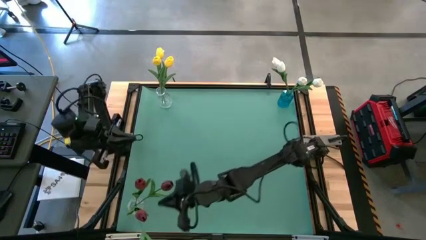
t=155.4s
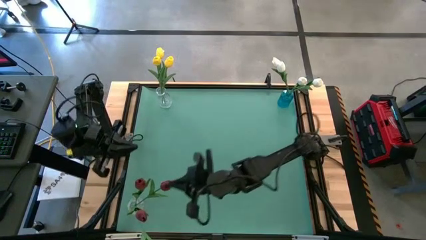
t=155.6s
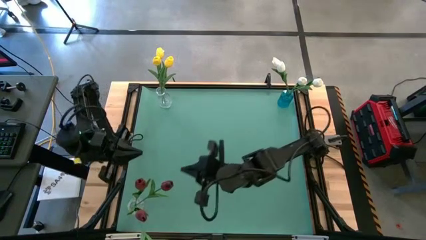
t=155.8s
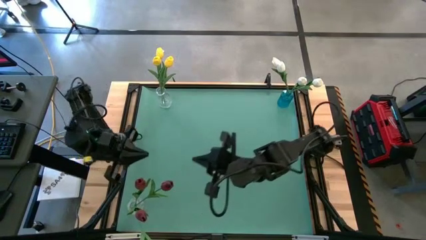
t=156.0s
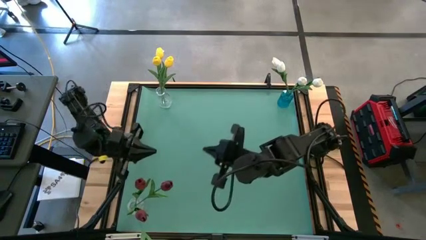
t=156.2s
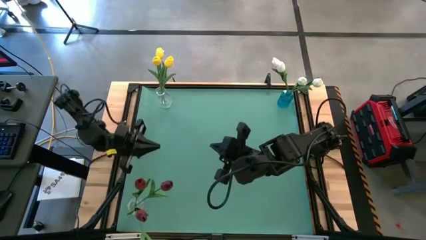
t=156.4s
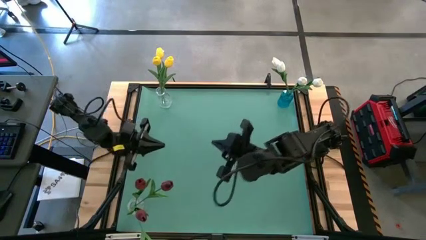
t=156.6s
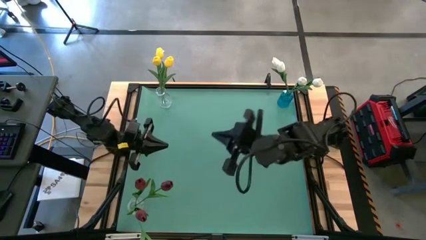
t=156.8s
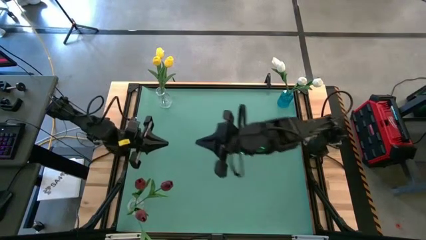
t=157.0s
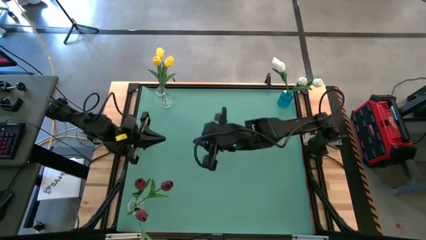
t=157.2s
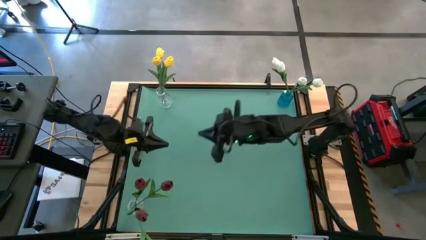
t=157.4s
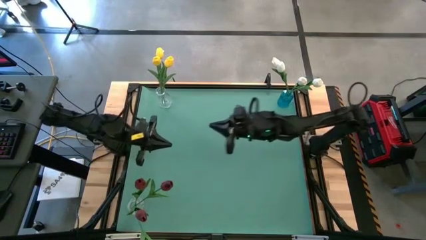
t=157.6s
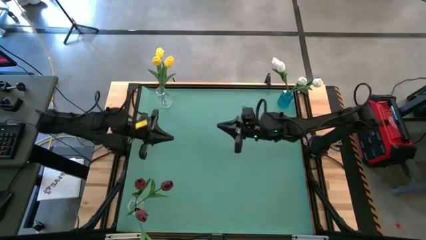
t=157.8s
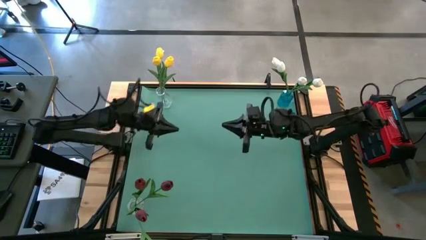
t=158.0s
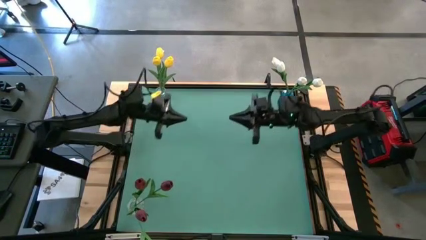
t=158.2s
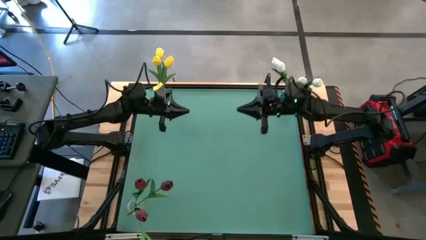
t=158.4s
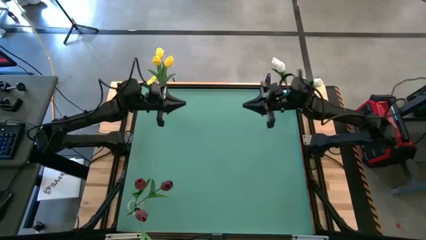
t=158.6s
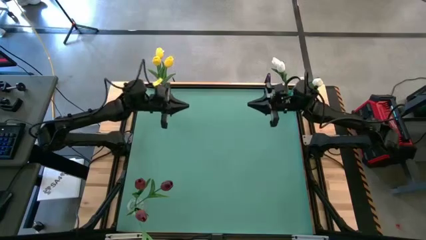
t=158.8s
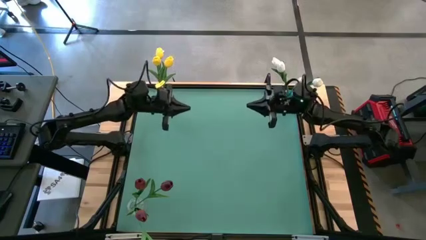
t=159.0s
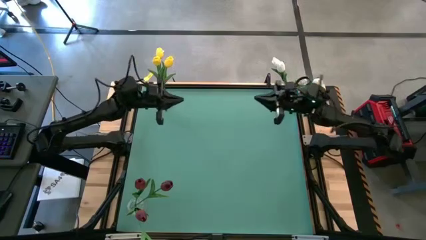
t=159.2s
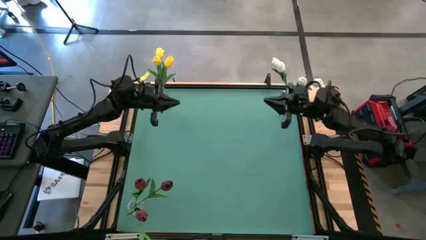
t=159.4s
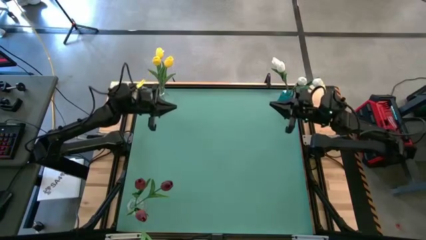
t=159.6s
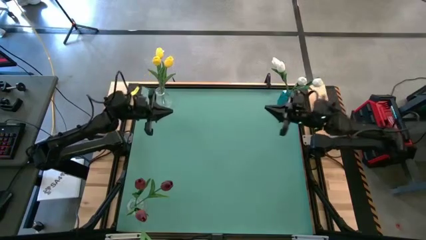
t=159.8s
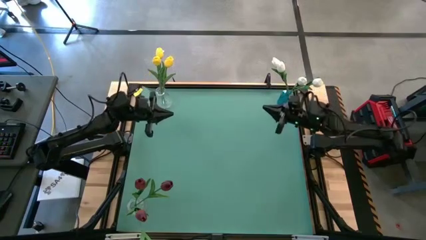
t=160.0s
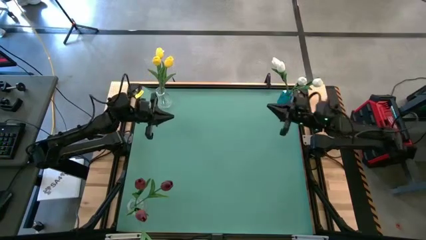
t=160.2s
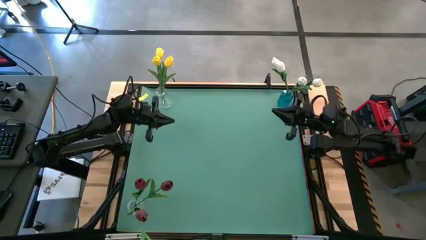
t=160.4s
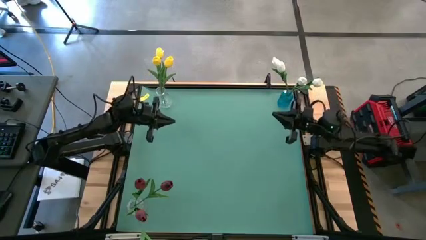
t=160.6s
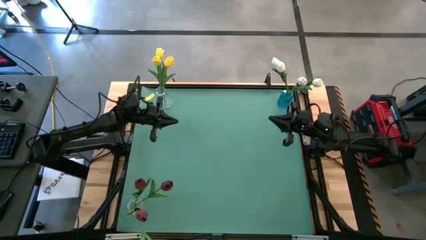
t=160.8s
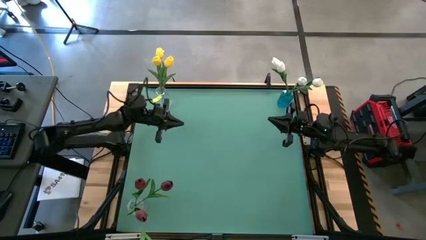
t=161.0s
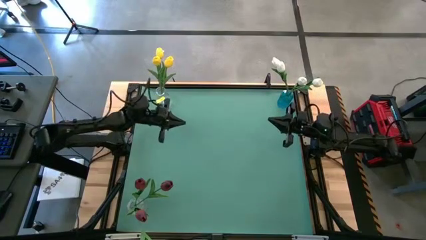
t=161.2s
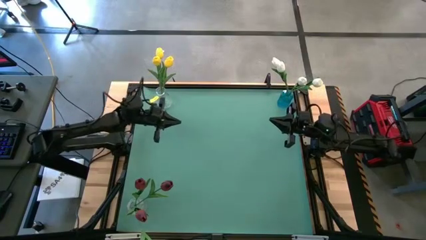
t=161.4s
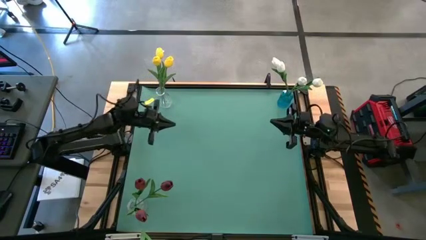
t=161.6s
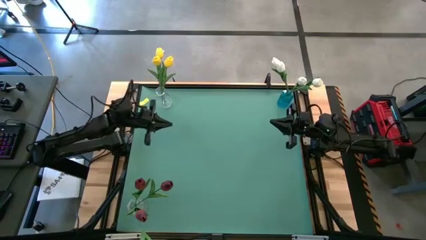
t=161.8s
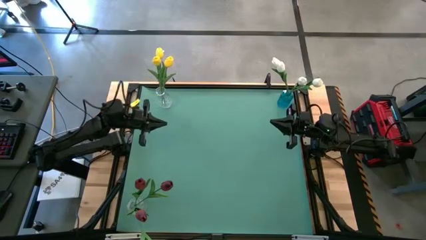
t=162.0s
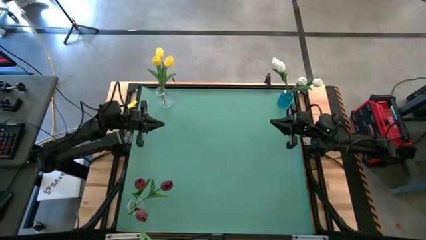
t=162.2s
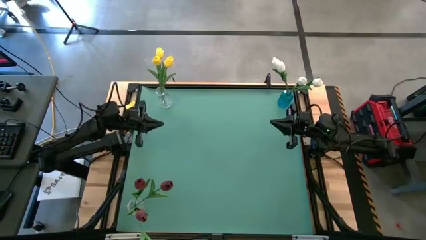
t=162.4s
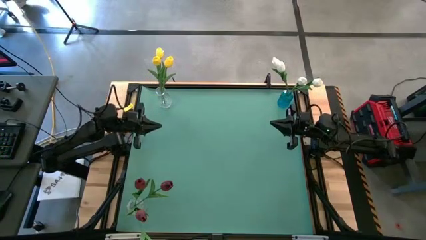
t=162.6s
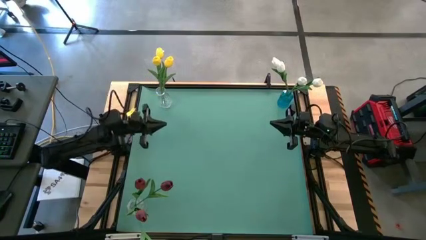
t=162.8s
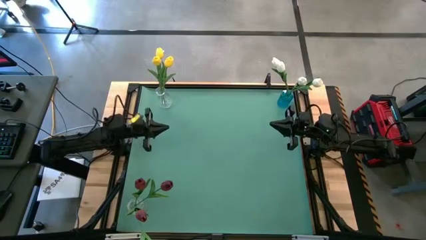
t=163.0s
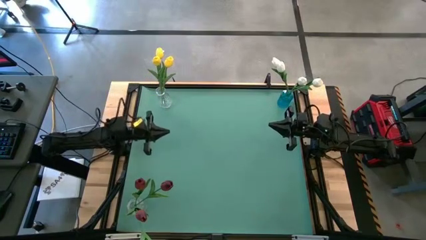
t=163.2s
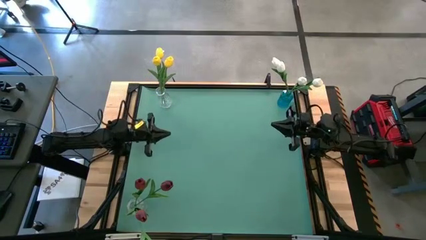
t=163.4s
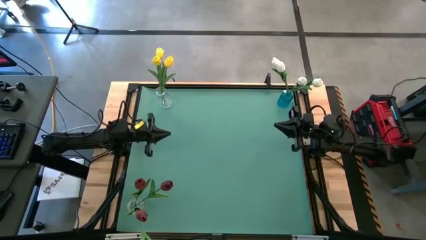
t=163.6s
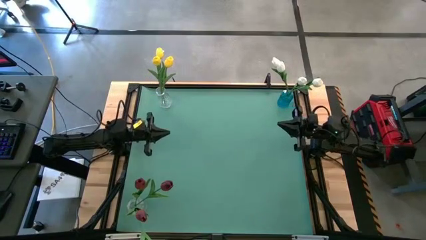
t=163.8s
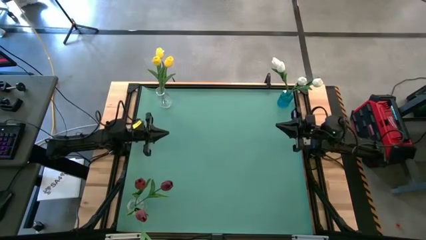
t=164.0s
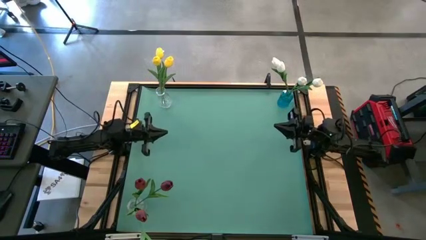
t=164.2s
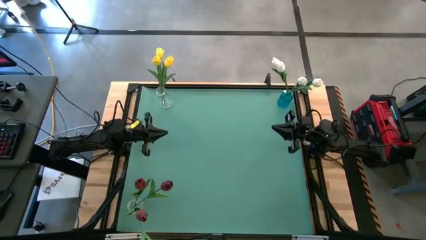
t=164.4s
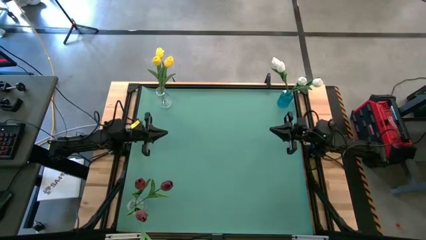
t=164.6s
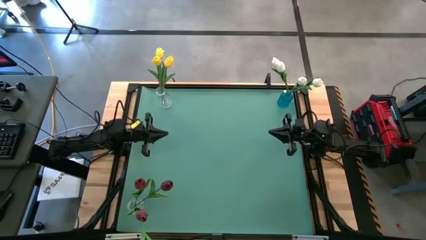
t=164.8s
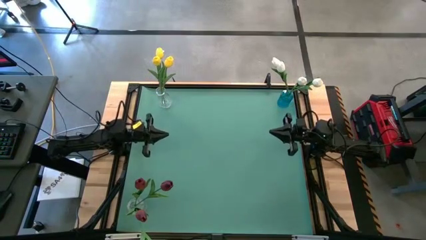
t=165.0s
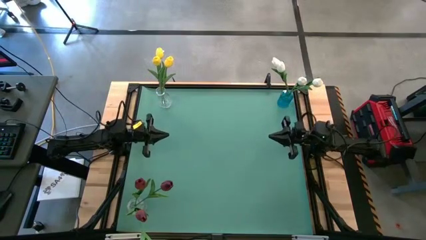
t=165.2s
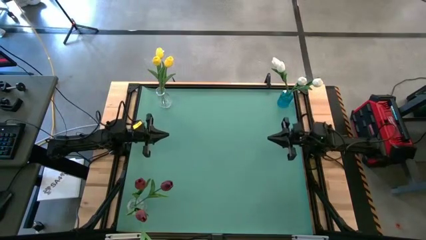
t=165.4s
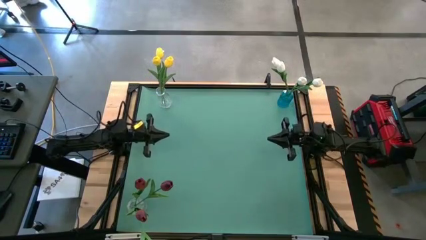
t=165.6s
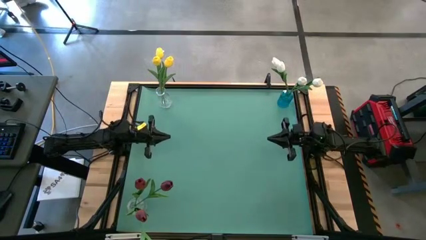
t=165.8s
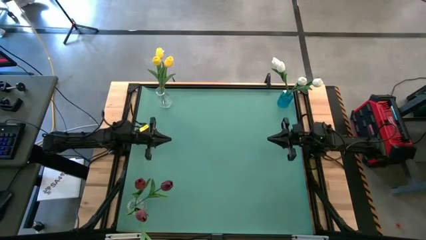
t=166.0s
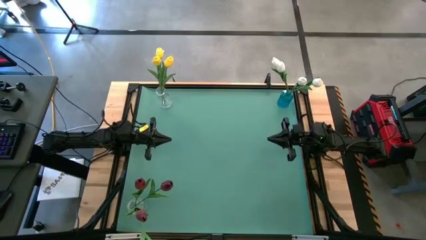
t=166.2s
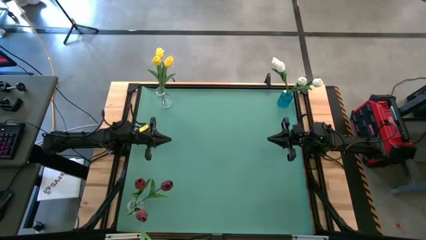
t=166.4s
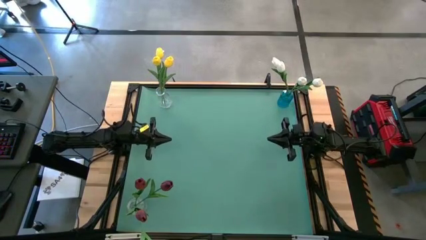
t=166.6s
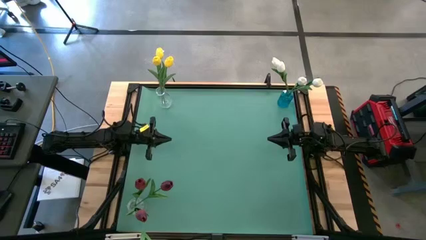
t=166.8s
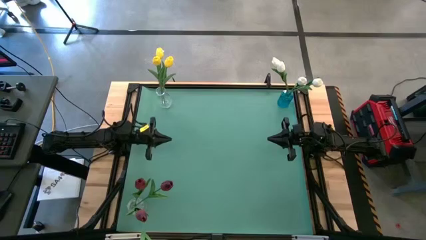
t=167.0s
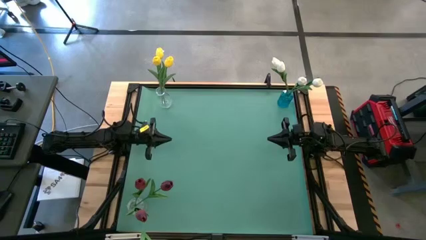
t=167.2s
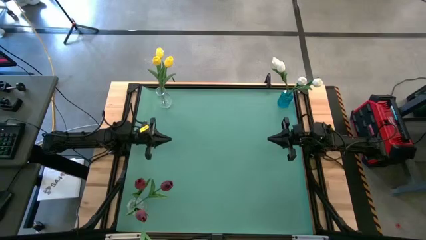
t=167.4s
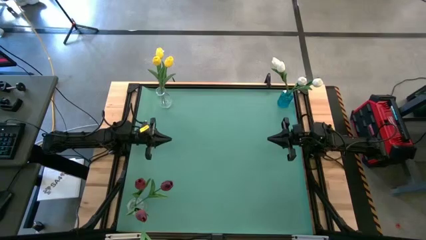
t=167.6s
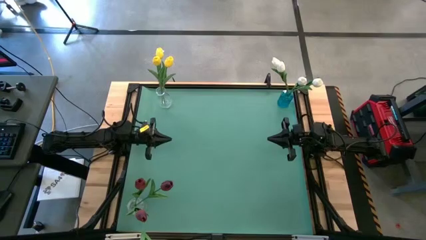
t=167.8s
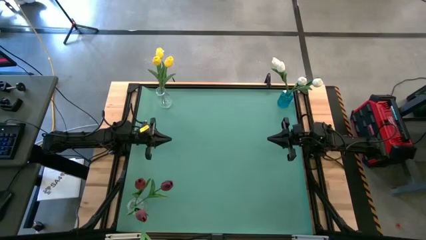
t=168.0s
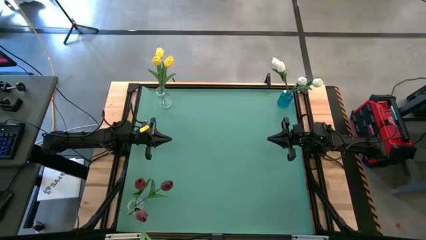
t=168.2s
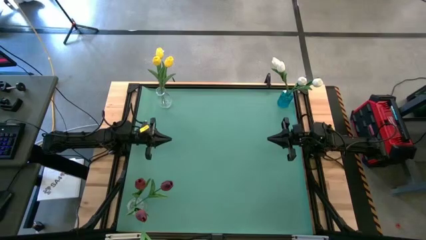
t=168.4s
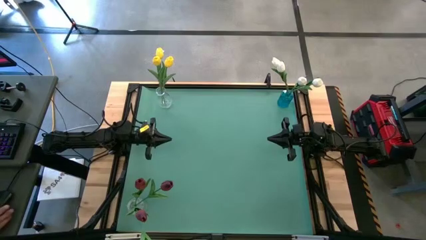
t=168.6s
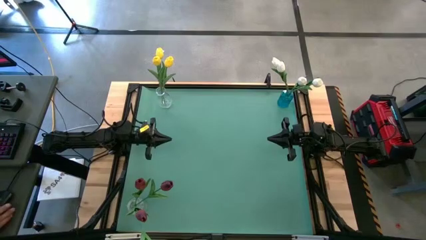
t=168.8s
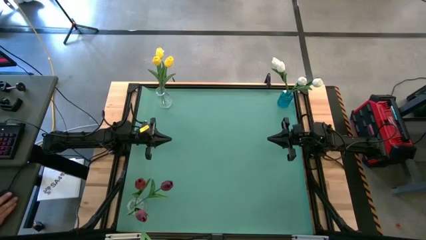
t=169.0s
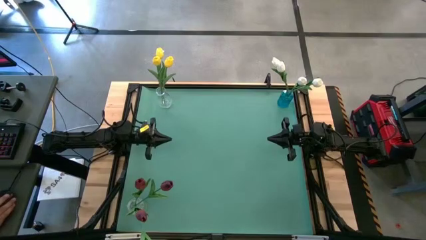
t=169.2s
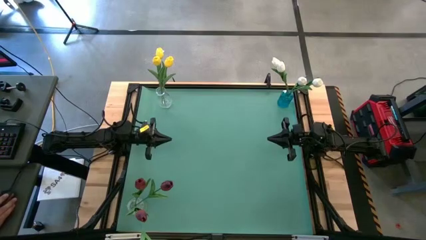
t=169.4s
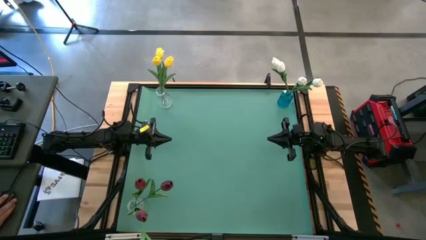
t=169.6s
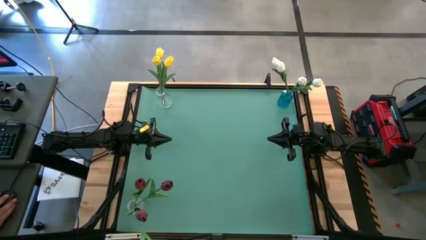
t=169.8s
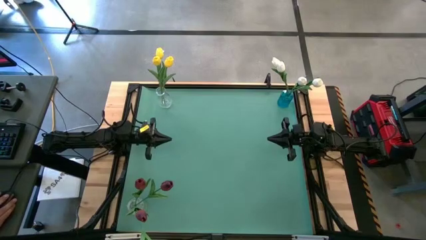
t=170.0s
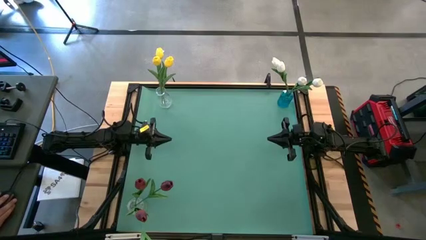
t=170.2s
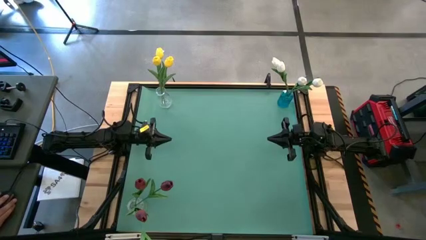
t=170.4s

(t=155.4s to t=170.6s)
Task: Sort flowers into vase by color
Return to Home Position

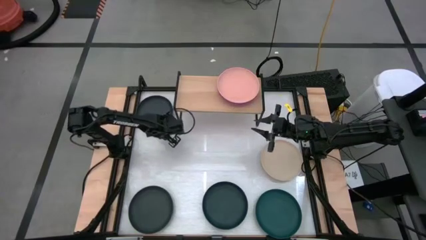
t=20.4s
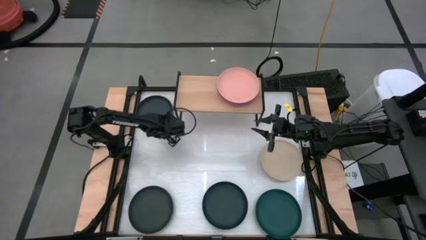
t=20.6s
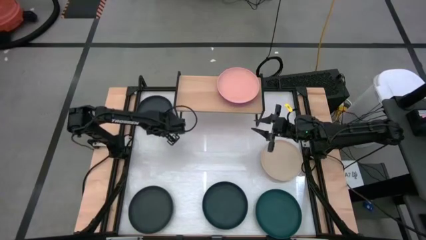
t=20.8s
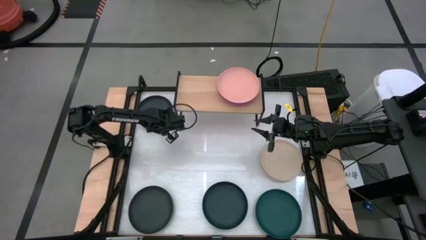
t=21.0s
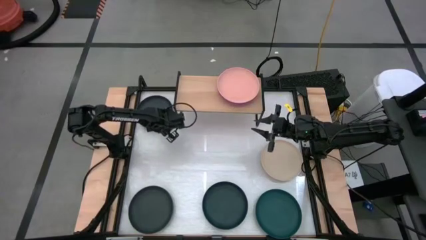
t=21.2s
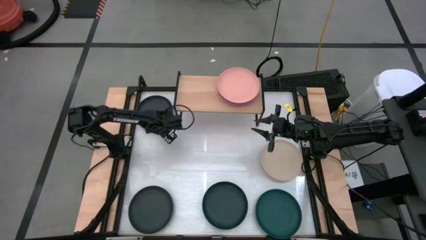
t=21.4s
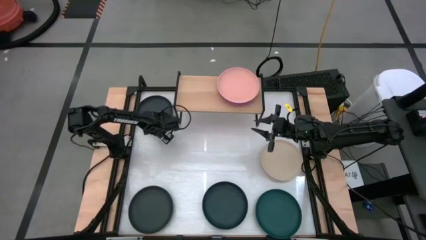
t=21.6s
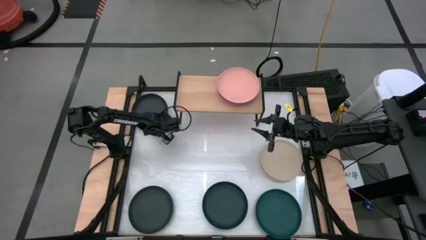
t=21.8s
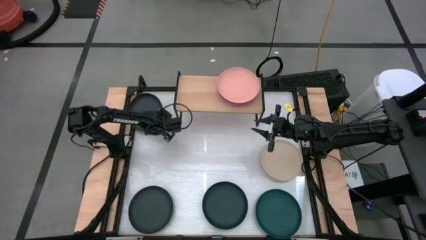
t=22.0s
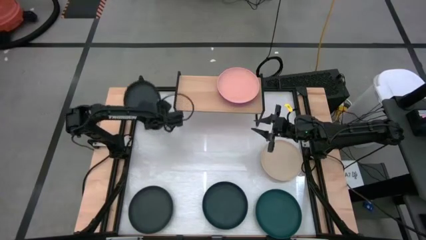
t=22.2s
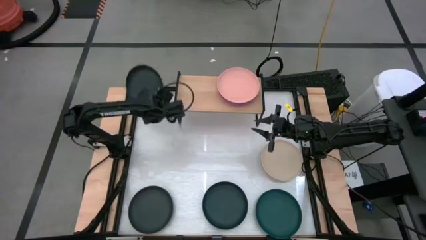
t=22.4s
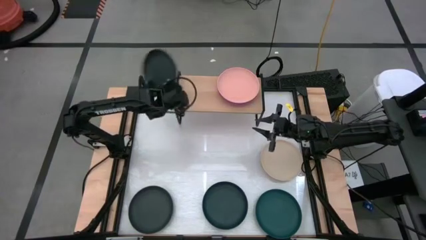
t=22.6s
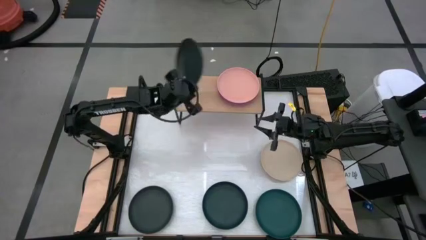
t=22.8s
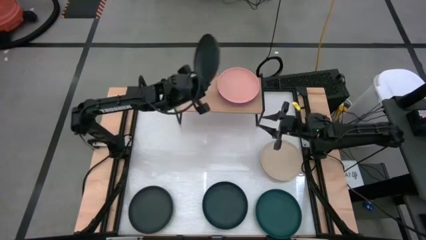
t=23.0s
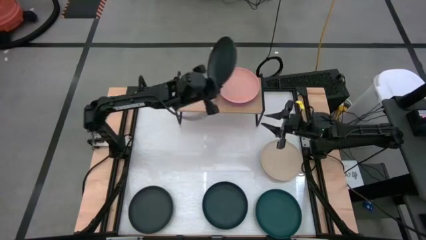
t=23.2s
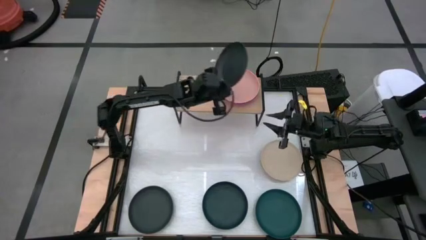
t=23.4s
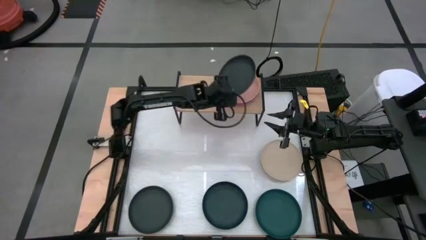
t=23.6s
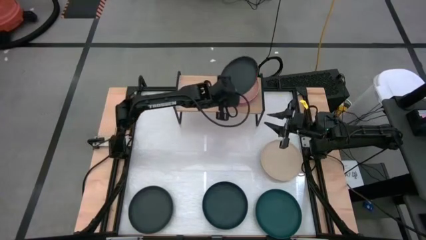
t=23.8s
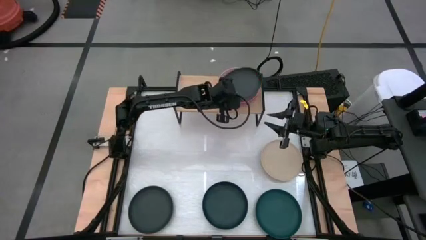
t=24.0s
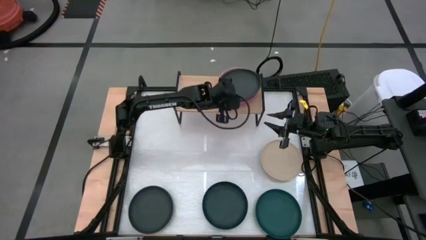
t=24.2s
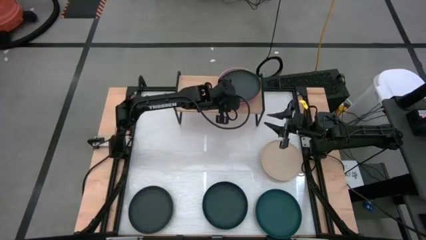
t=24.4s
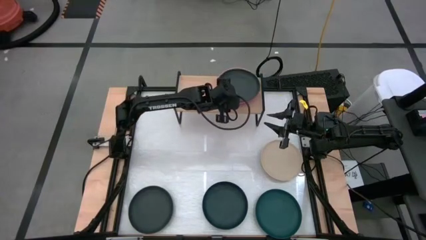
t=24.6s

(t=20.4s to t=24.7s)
Task: Place and stack plates onto a shelf
Stack the top black plate on top of the light pink plate on the shelf
